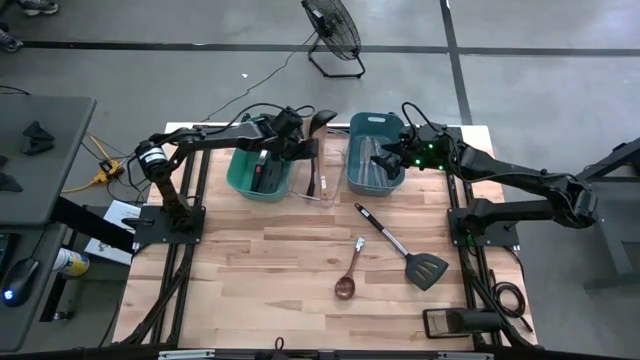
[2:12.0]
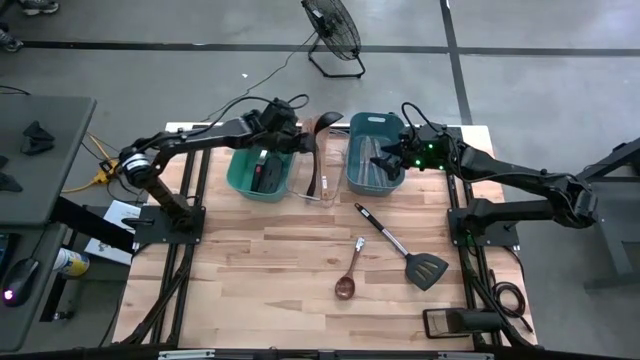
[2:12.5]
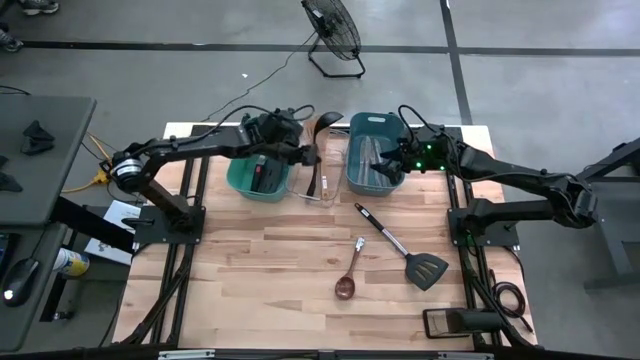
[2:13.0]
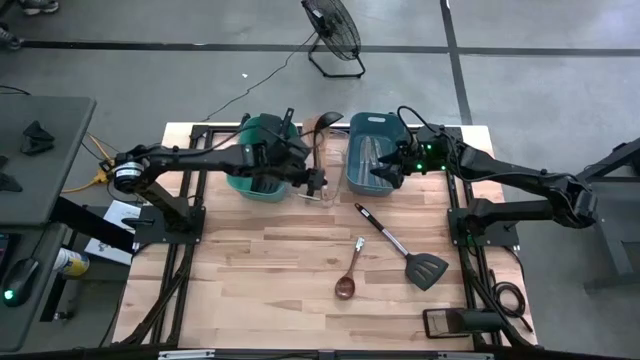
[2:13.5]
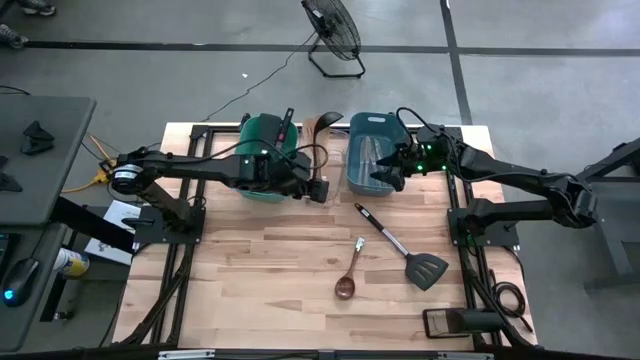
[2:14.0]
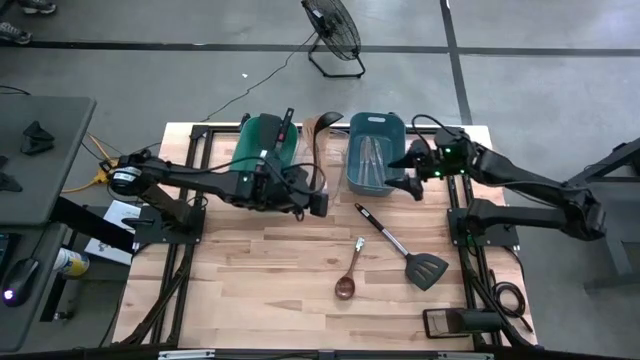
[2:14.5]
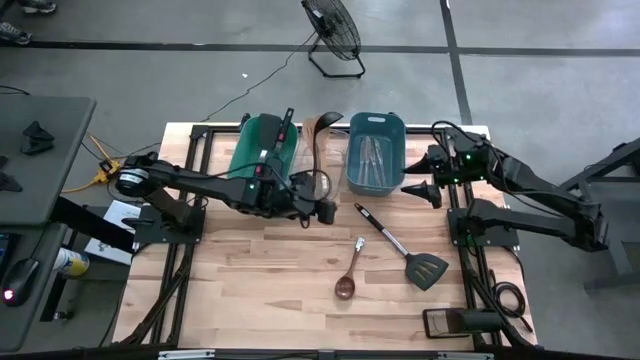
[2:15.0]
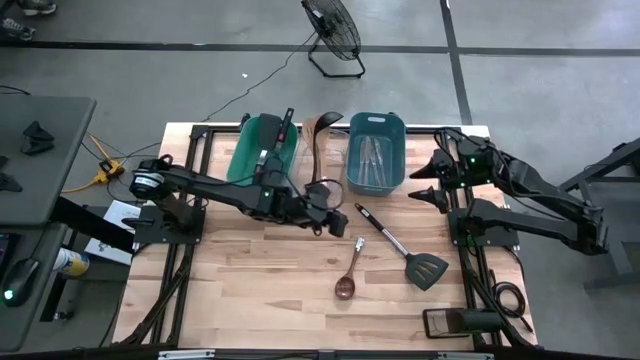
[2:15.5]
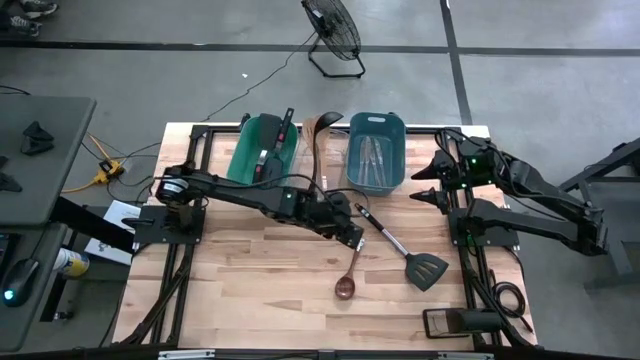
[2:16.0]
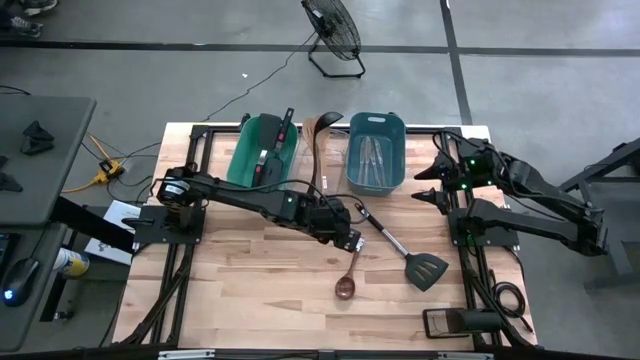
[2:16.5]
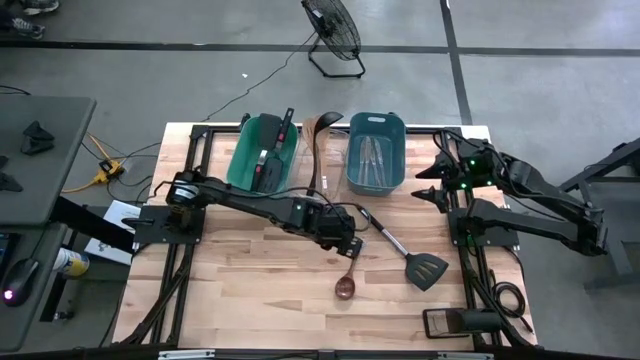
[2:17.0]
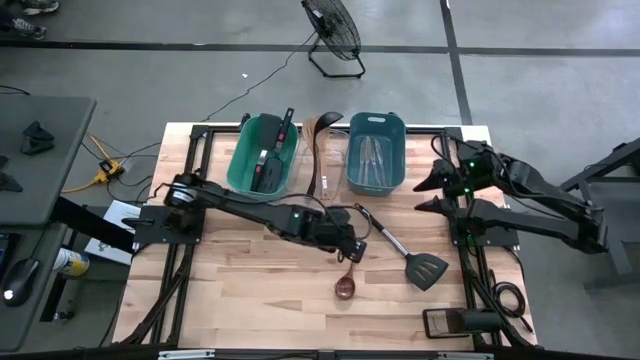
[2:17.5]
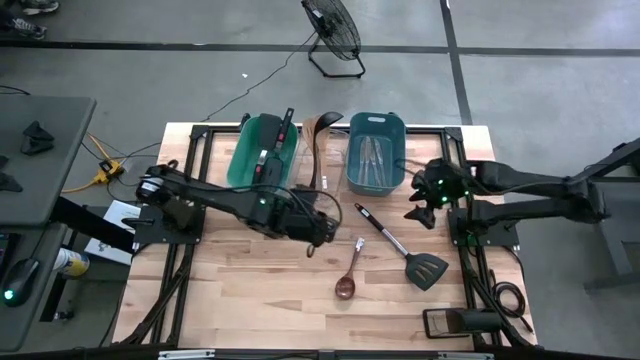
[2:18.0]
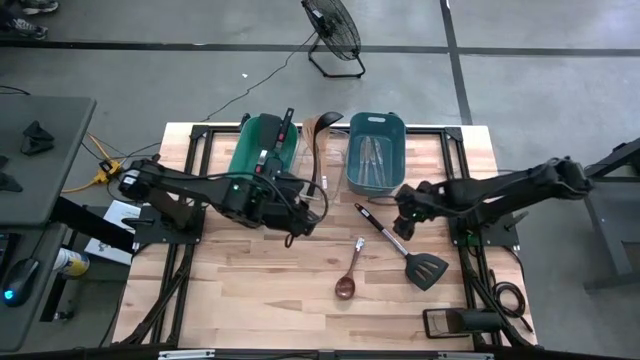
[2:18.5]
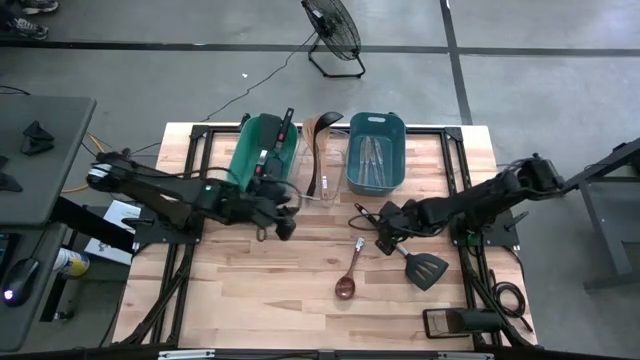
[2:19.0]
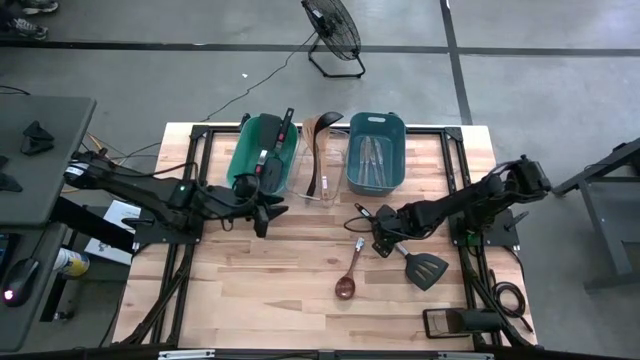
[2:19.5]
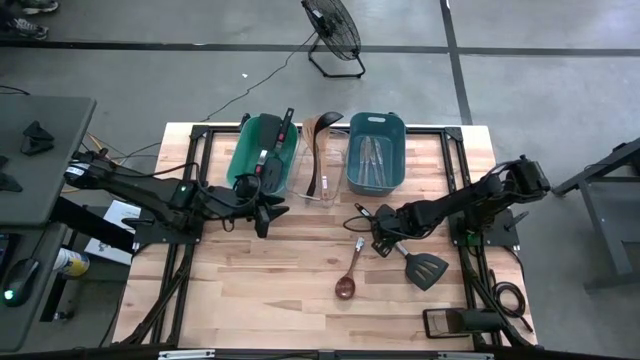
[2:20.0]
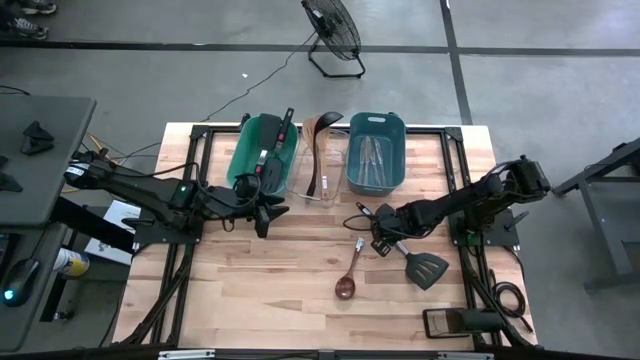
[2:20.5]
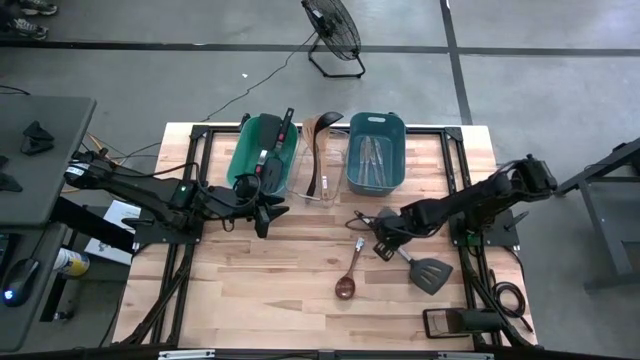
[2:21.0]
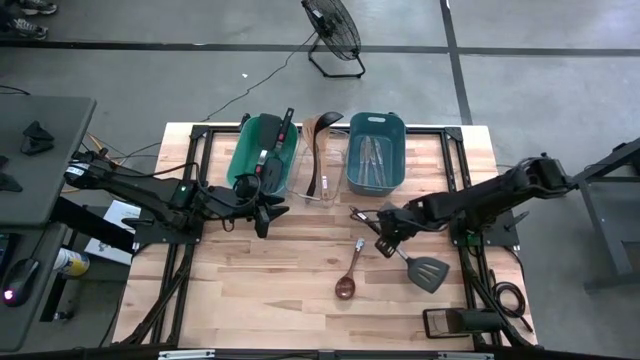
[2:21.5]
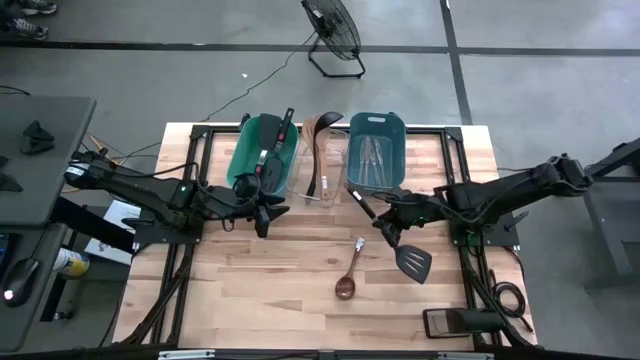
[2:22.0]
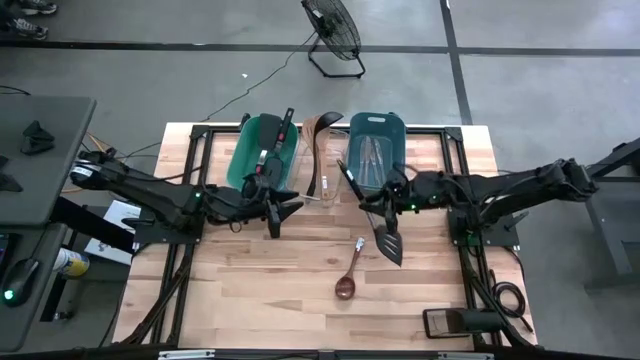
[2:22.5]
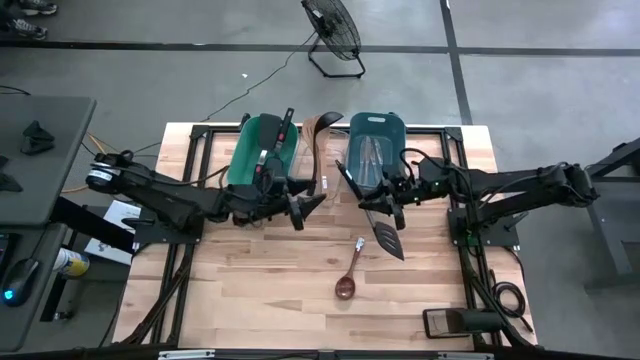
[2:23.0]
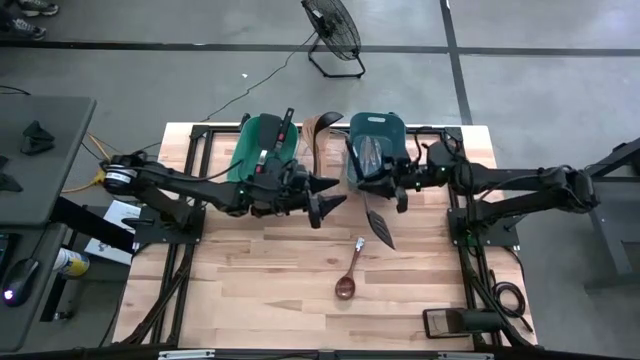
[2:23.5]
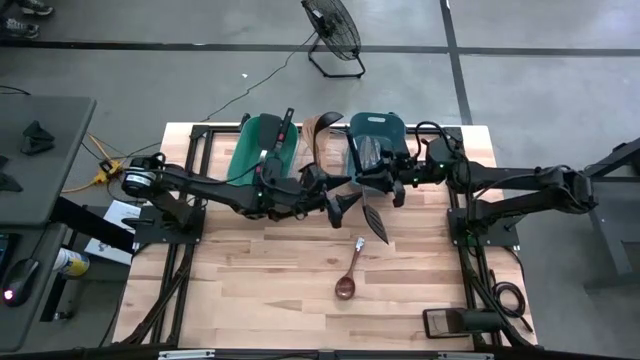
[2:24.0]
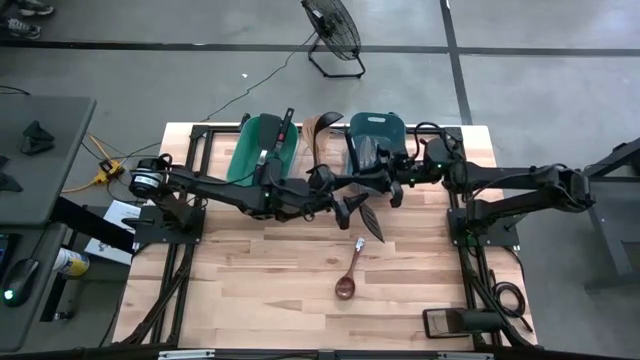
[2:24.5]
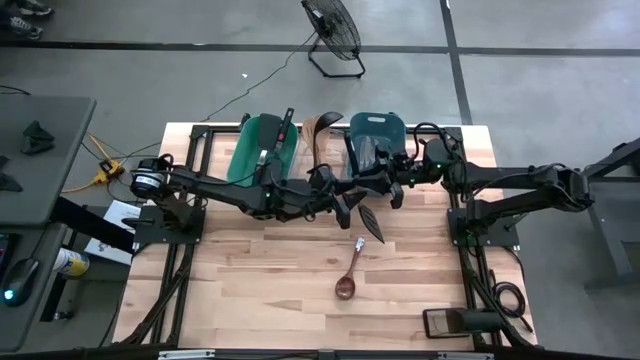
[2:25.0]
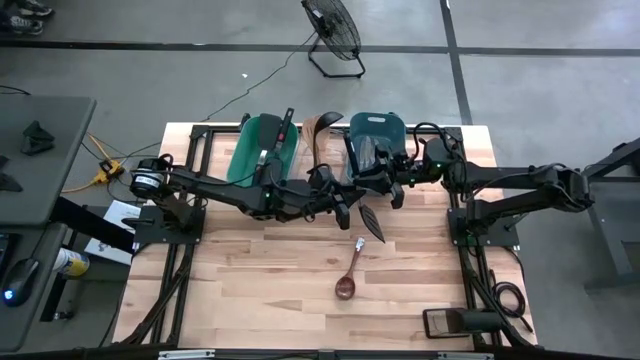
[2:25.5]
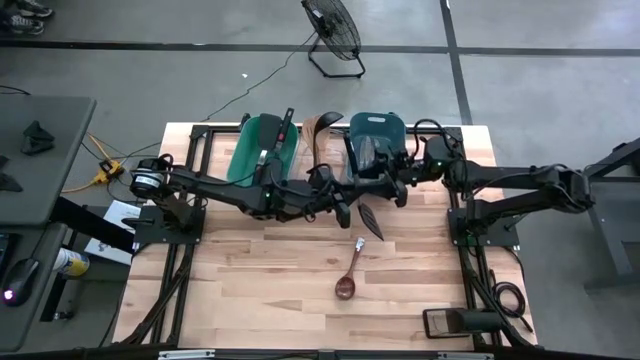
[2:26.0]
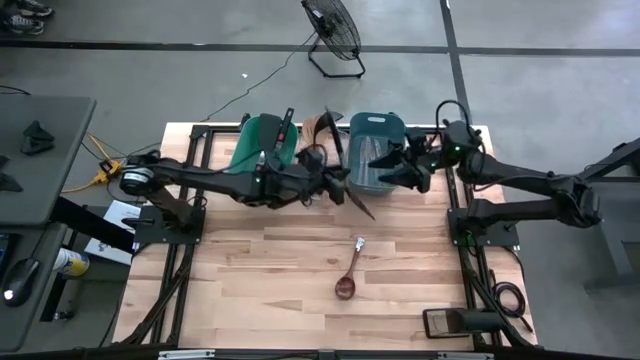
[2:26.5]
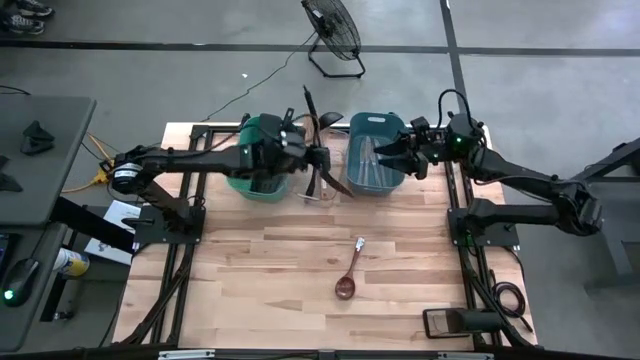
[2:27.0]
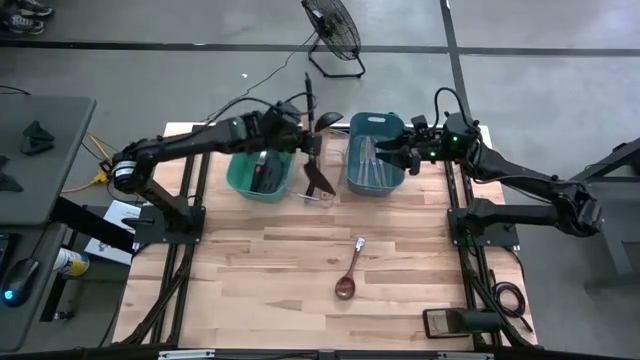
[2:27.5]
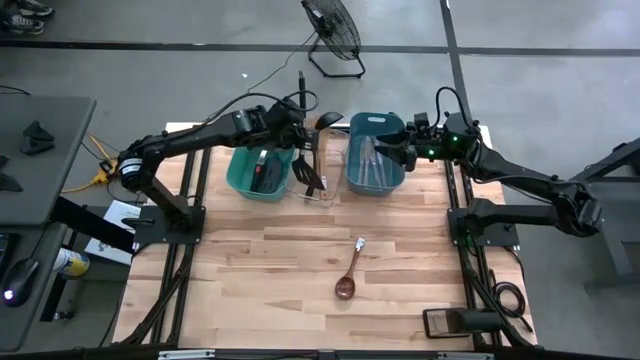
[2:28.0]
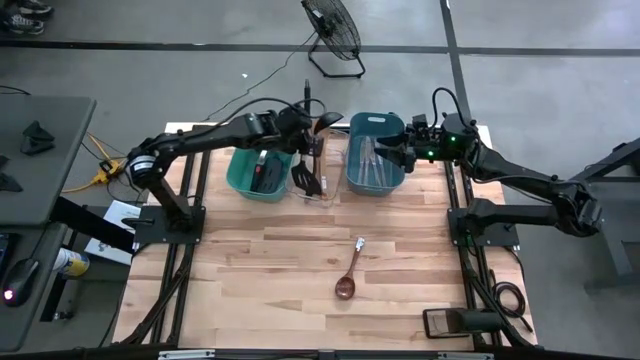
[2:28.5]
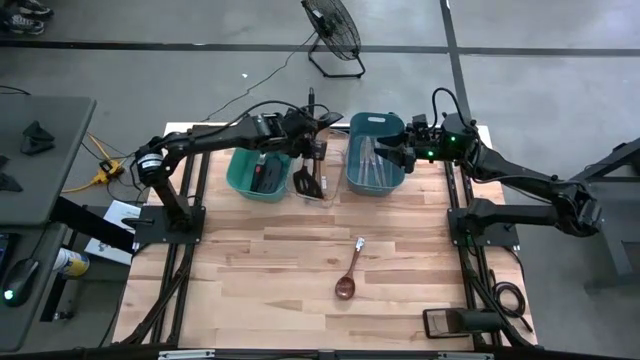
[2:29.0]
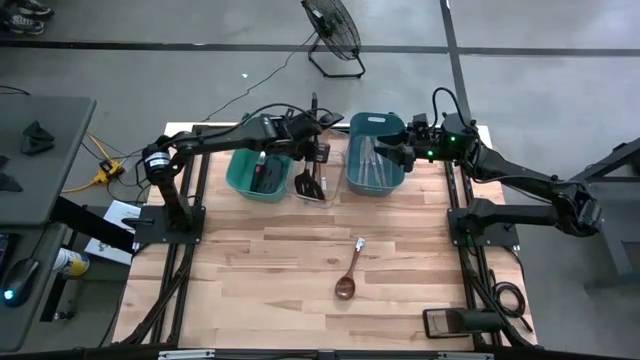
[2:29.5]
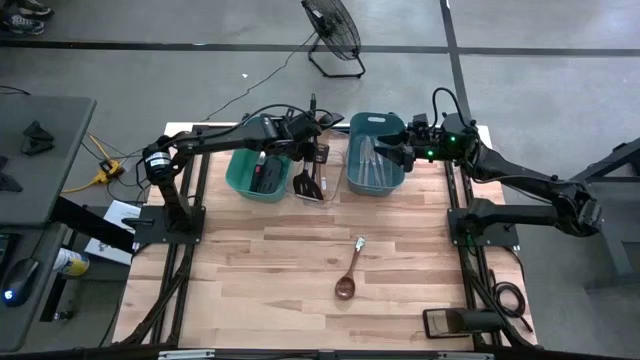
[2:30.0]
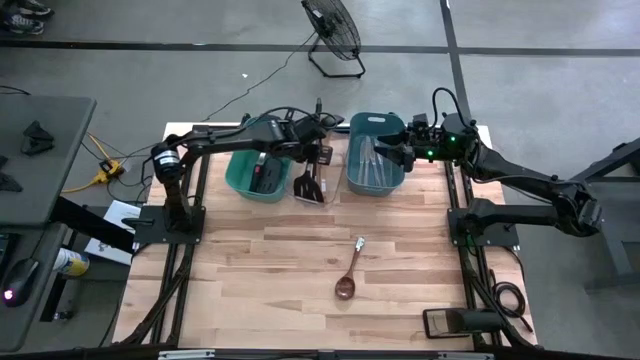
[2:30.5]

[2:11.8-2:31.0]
Task: Pick & Place Kitchen Items
Put the black slotted spatula into the transparent bin
